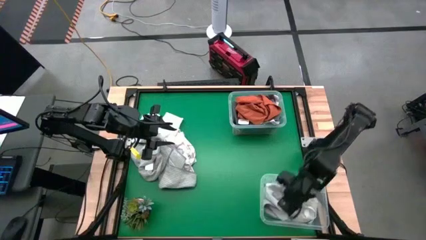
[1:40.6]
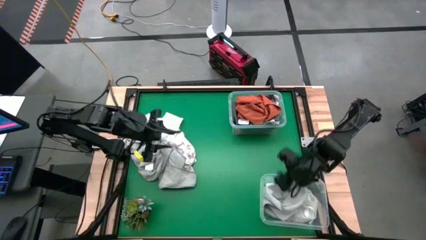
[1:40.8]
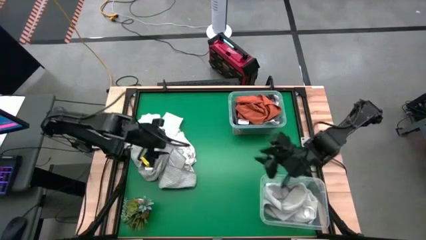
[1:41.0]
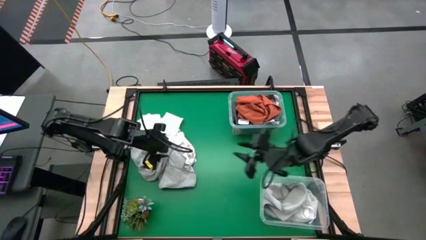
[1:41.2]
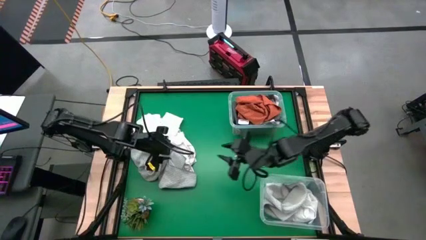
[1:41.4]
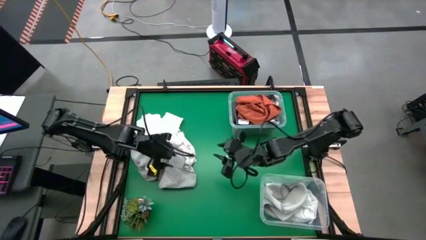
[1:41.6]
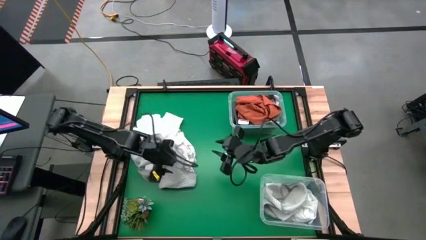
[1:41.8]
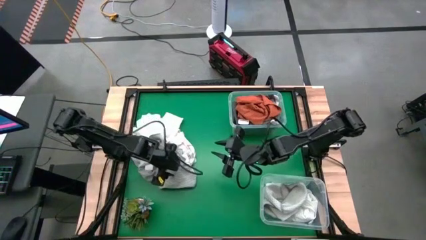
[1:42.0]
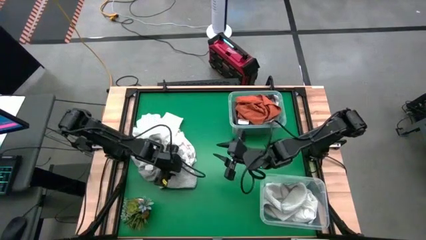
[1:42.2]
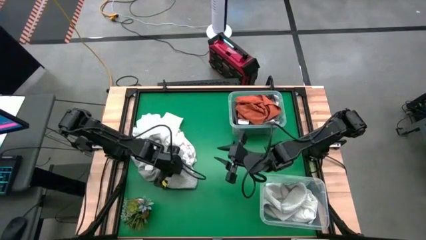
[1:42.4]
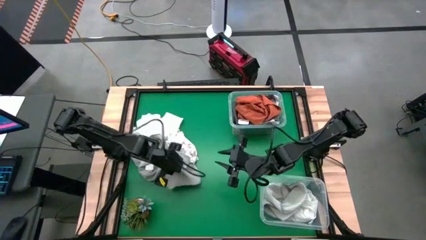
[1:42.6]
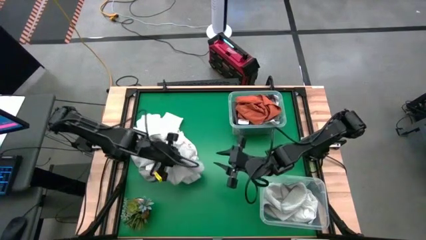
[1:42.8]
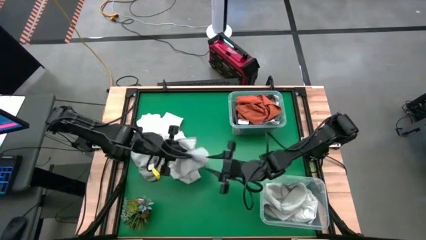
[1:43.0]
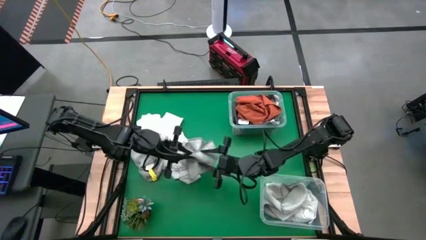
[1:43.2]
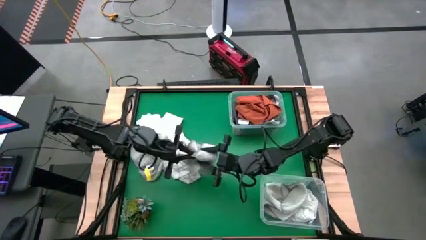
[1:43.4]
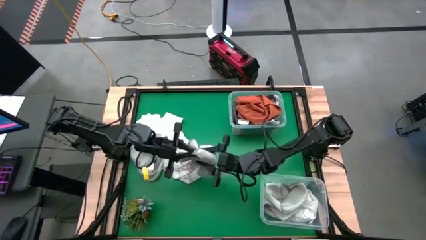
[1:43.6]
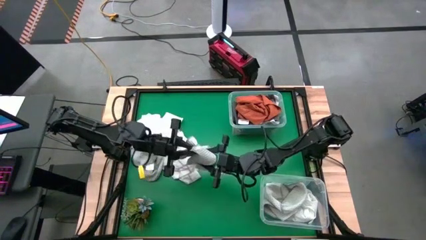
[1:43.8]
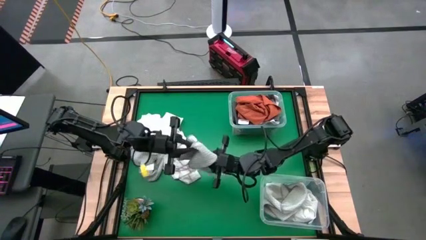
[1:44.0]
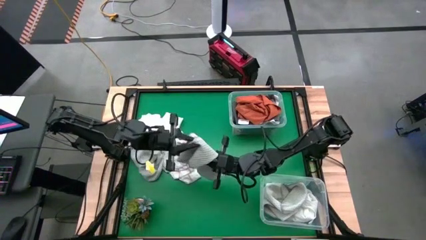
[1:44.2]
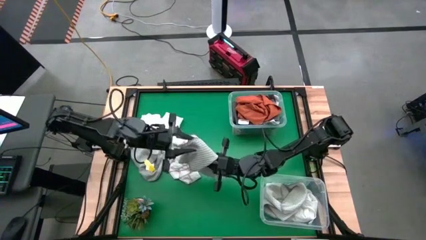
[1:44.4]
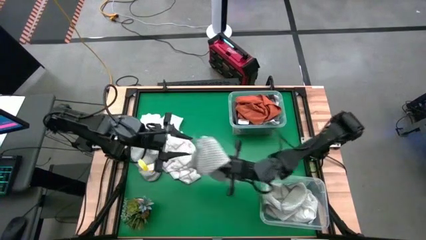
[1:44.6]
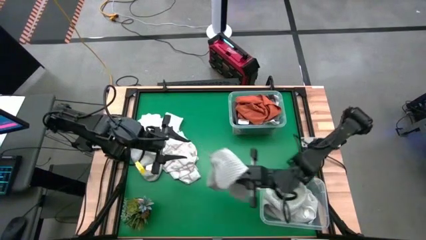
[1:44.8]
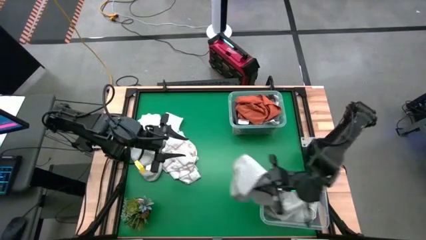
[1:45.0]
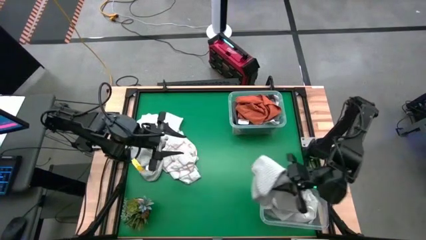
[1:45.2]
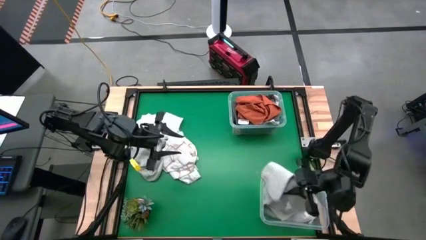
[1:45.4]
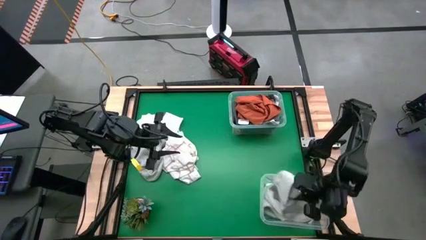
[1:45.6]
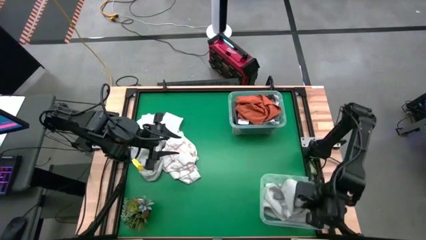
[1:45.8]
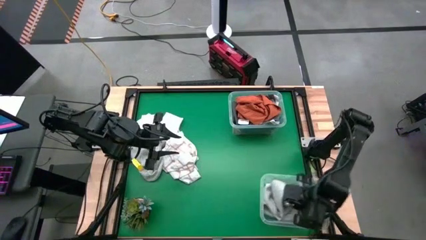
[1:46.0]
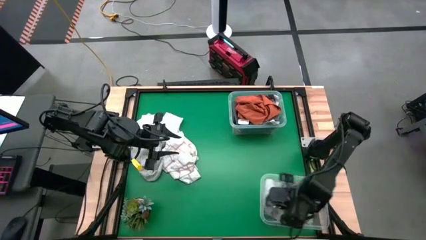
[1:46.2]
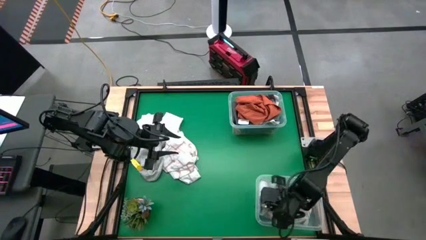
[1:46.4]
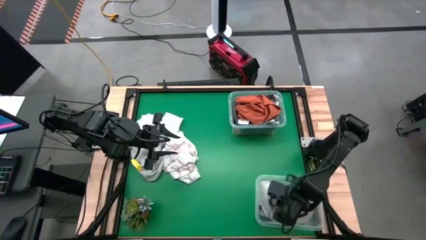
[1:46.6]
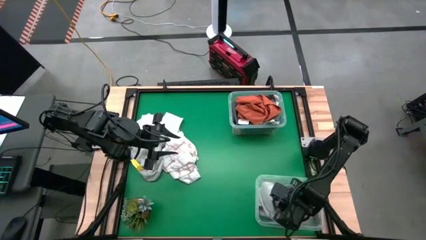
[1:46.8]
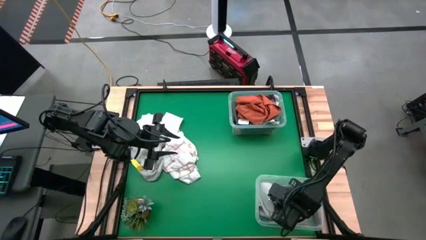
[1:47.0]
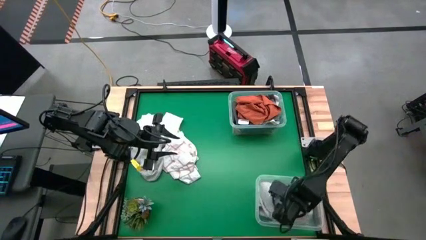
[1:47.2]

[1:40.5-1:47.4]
Task: Sort towels by color in basket
Put the light gray towel into the bottom transparent bin

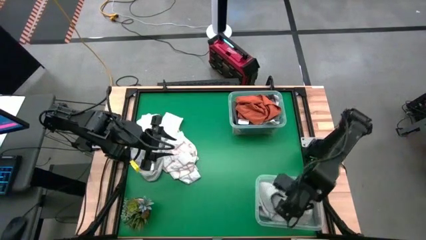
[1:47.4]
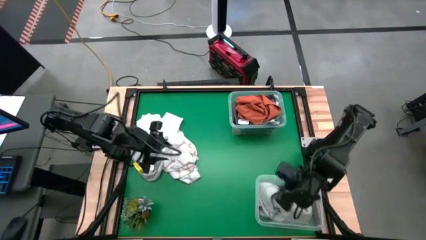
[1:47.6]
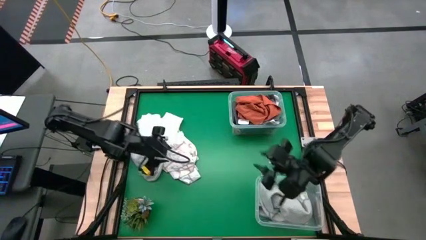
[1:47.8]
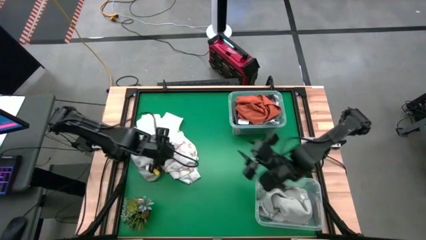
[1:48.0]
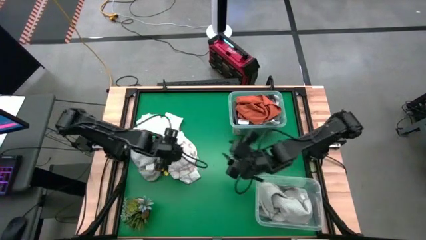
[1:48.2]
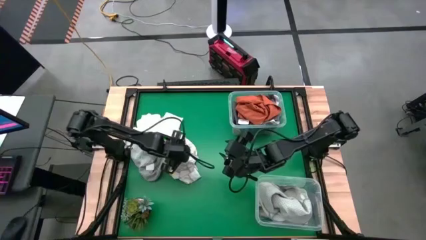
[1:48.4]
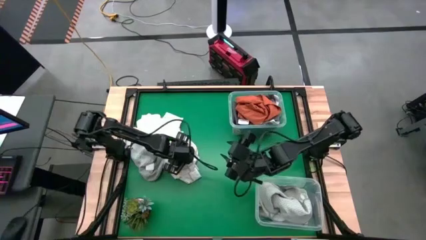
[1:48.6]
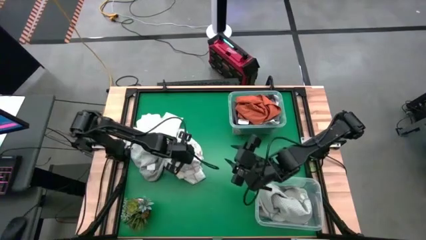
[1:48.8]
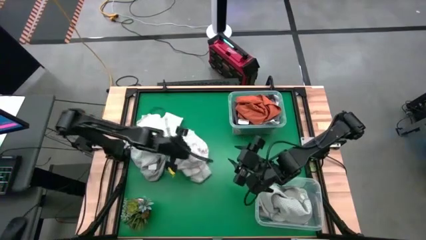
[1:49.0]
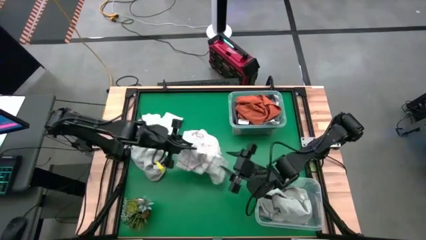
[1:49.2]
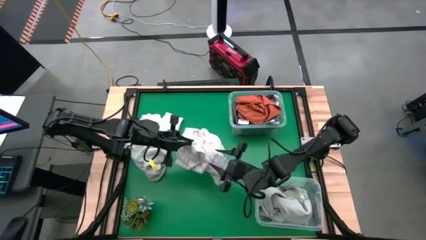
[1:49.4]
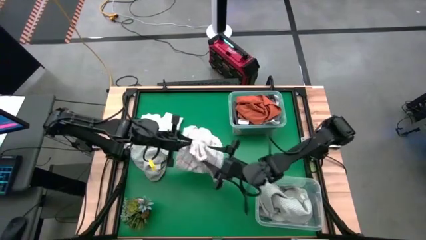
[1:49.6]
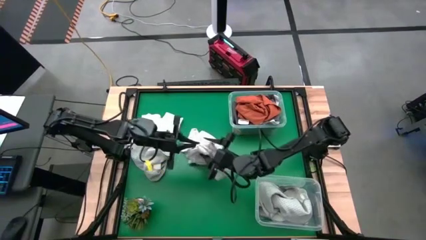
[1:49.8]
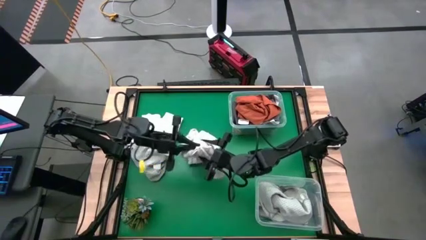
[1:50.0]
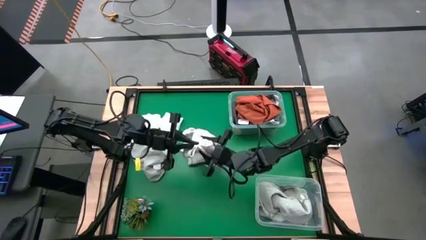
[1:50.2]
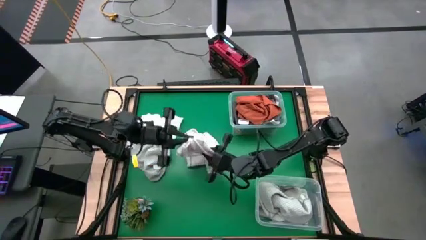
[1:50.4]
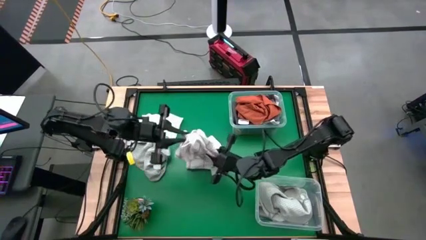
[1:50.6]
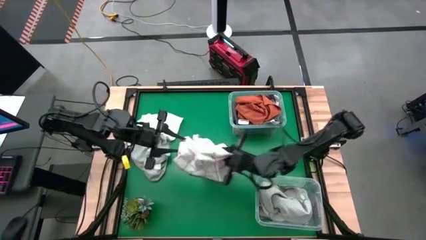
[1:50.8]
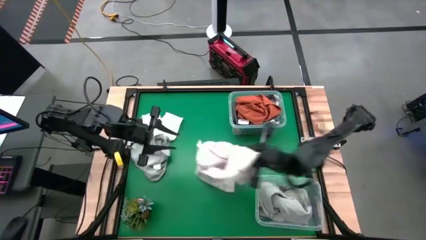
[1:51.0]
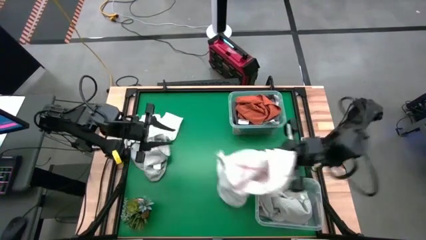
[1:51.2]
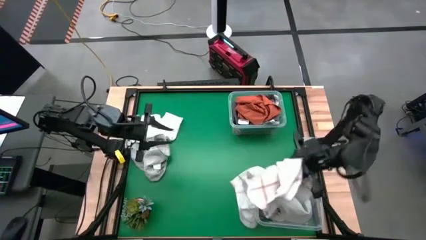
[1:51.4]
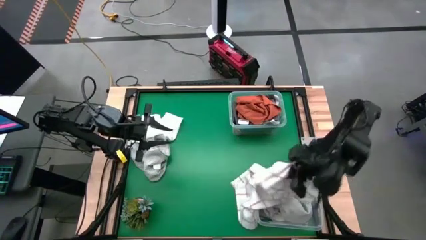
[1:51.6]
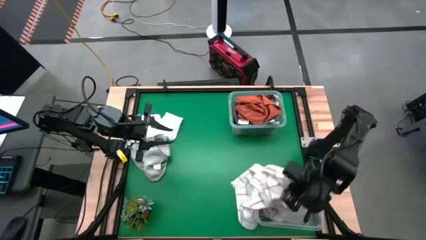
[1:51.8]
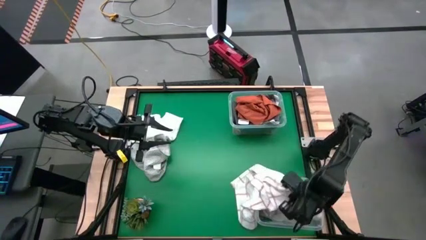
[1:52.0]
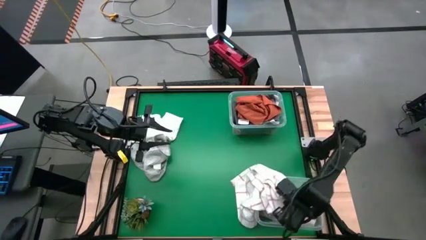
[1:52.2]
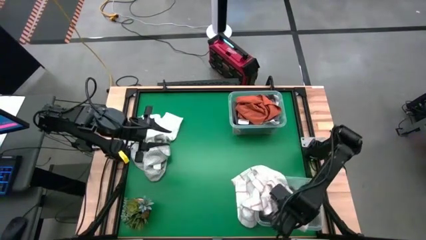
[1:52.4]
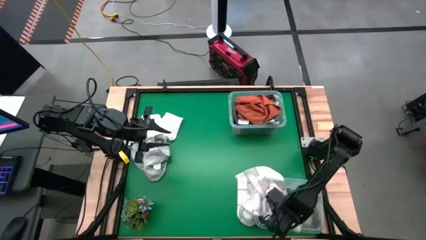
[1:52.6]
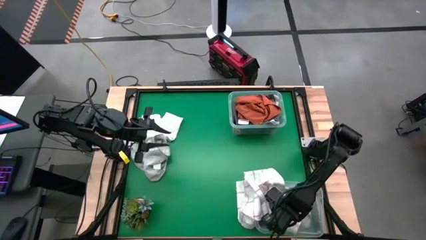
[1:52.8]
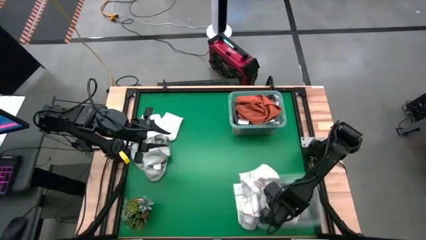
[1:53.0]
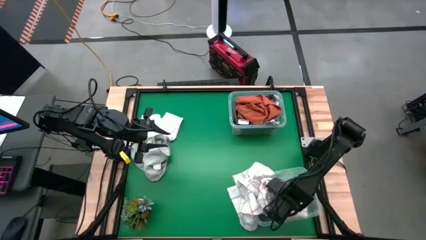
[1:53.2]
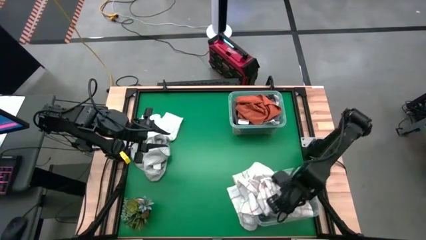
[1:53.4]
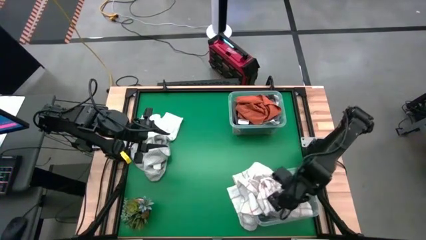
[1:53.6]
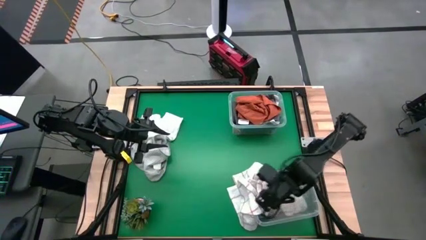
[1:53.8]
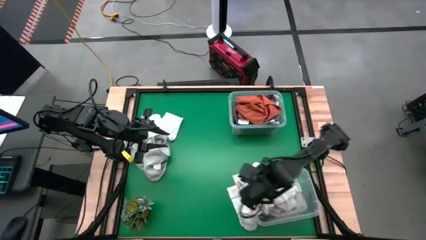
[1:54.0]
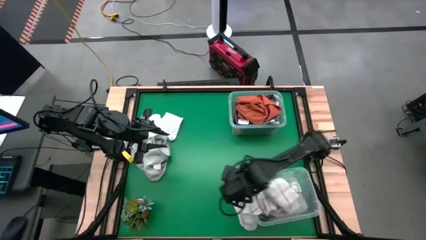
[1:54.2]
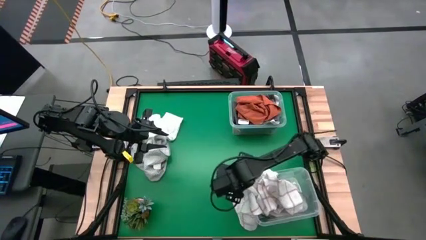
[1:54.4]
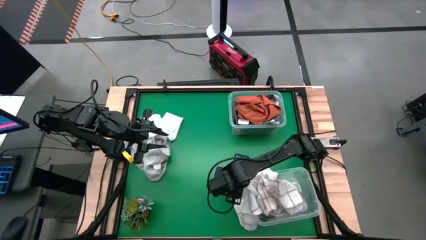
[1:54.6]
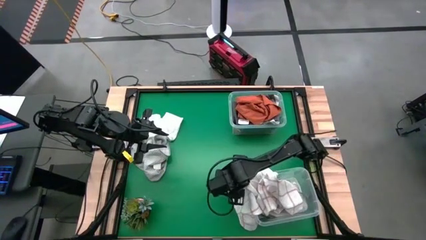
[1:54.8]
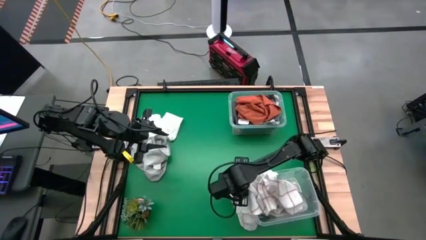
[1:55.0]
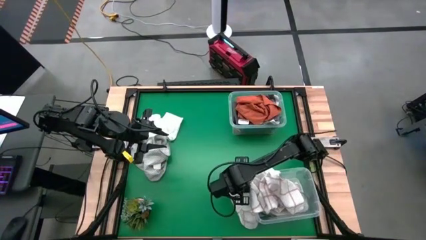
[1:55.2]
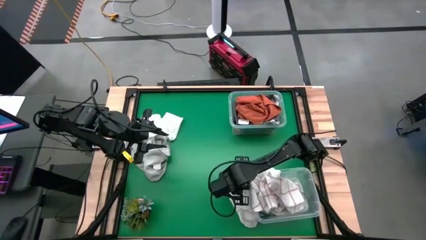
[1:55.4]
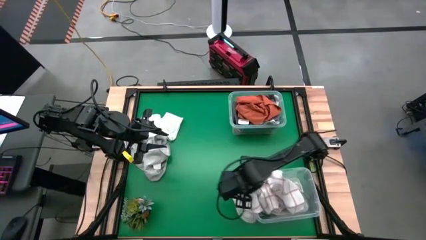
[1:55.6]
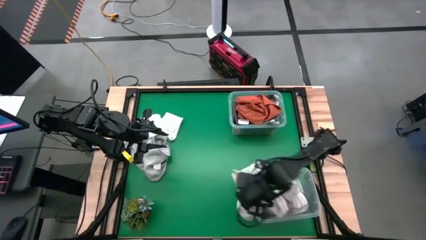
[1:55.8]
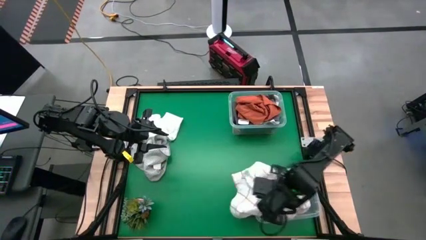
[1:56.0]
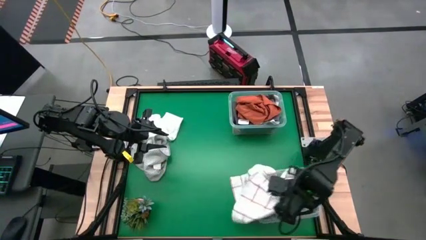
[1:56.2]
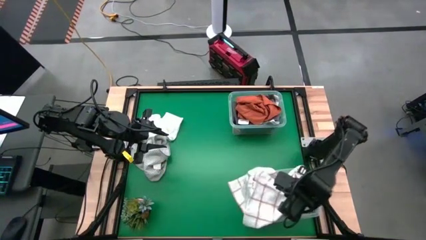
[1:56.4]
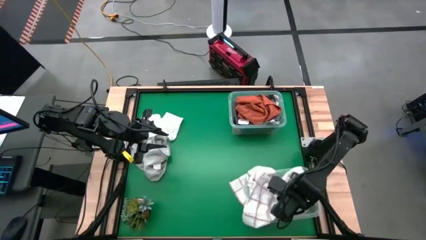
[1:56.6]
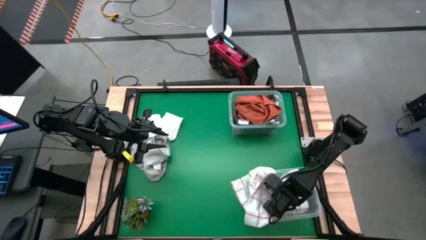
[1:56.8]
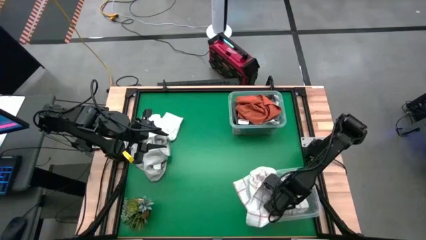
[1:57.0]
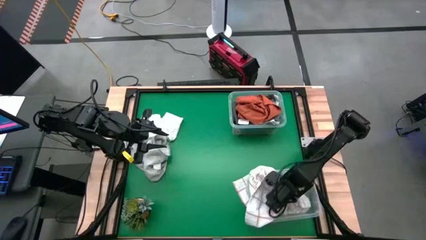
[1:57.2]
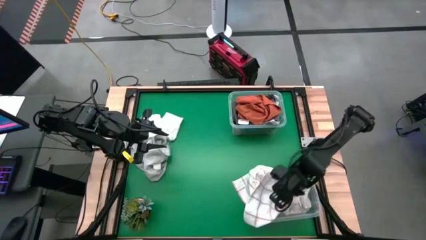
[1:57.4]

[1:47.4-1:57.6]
Put the white squared towel into the bottom transparent bin

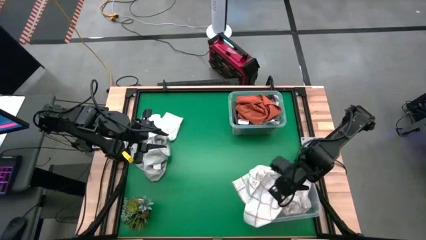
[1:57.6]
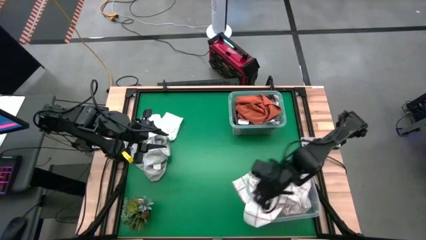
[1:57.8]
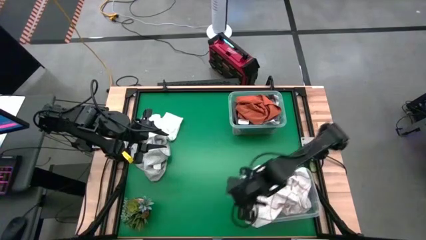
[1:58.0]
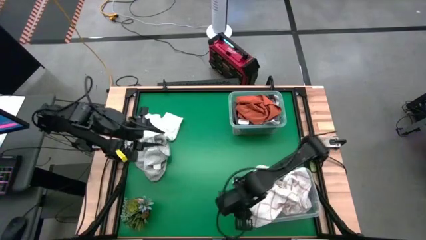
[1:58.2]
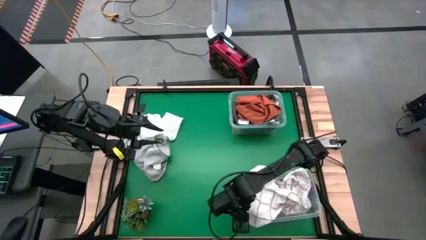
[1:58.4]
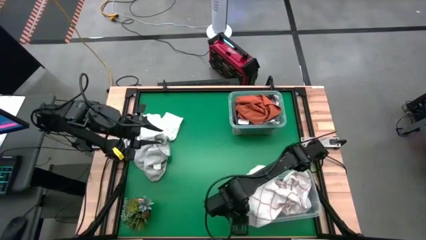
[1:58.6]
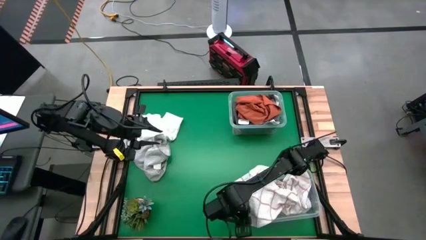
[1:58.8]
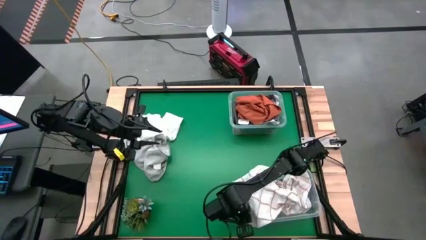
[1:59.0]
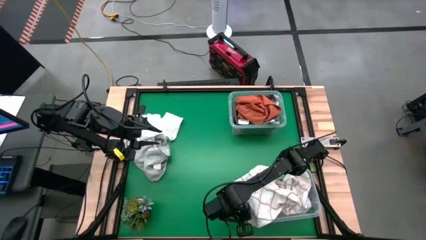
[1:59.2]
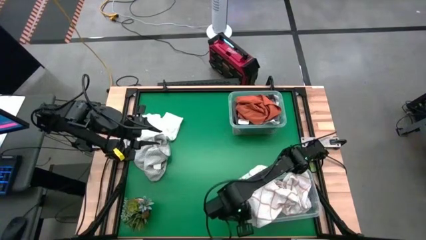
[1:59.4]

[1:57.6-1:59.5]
Put the white squared towel into the bottom transparent bin
